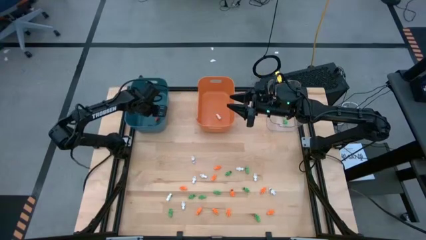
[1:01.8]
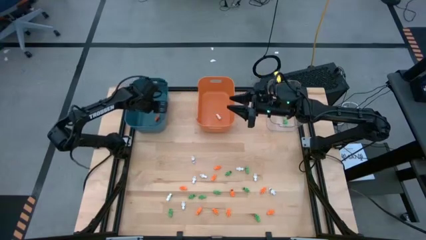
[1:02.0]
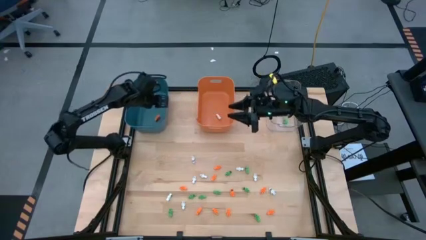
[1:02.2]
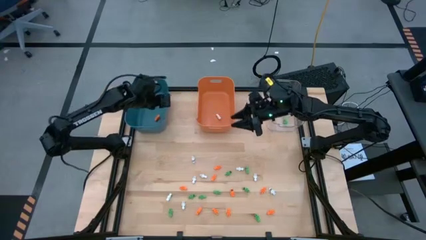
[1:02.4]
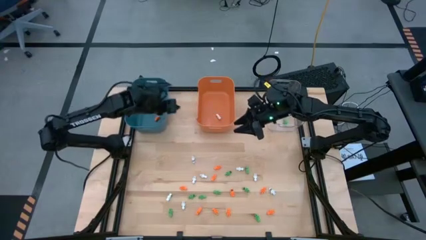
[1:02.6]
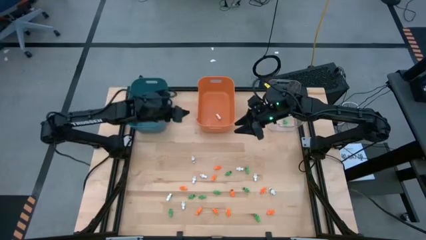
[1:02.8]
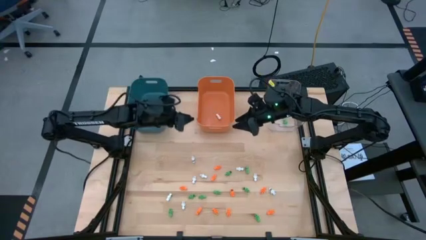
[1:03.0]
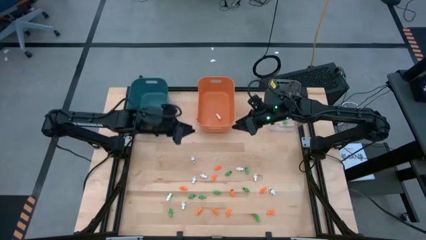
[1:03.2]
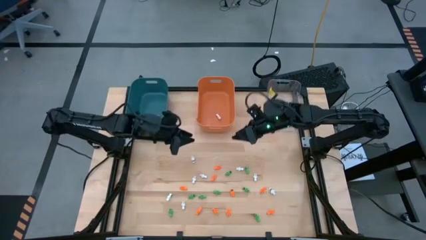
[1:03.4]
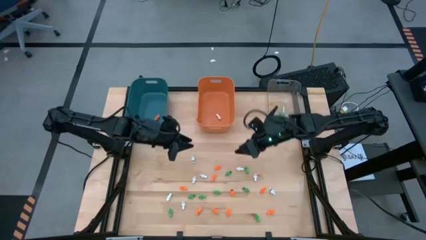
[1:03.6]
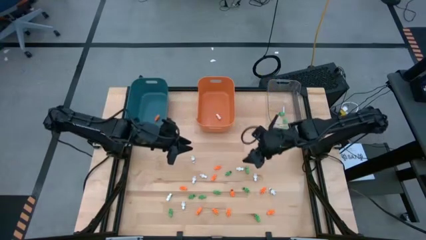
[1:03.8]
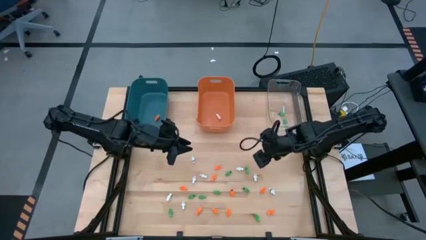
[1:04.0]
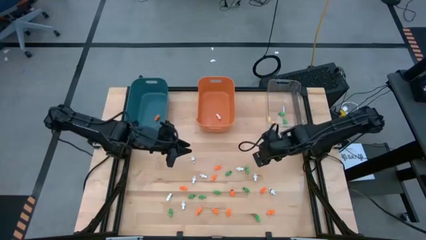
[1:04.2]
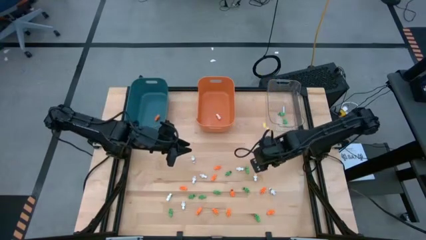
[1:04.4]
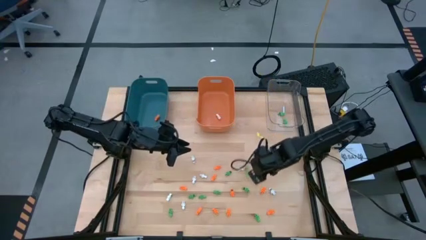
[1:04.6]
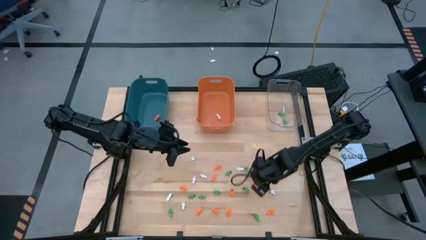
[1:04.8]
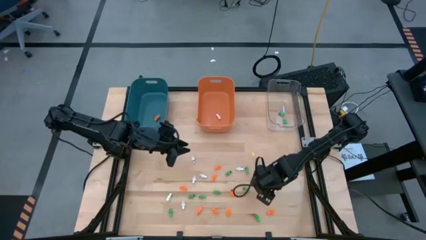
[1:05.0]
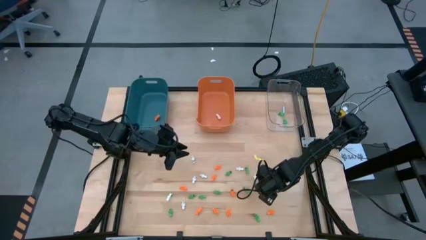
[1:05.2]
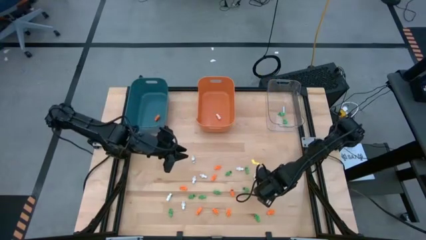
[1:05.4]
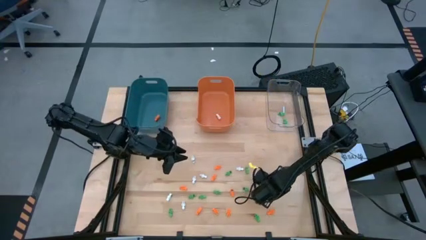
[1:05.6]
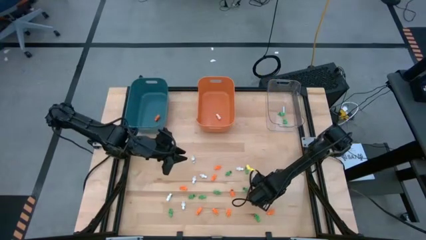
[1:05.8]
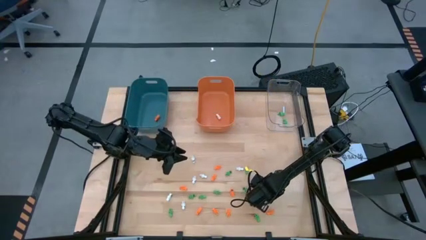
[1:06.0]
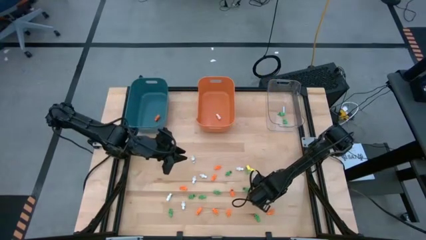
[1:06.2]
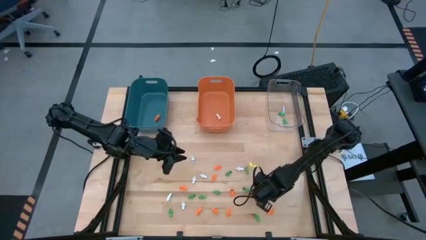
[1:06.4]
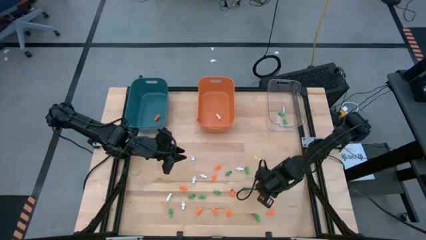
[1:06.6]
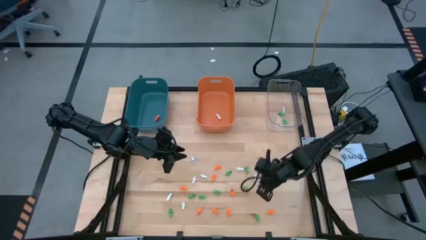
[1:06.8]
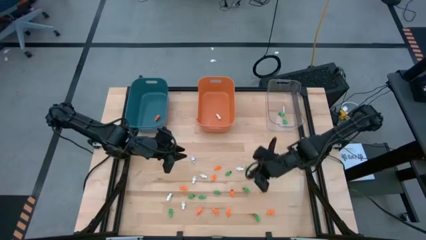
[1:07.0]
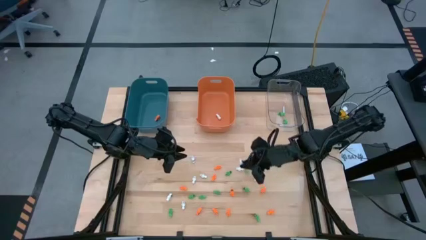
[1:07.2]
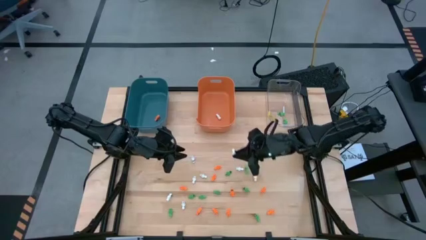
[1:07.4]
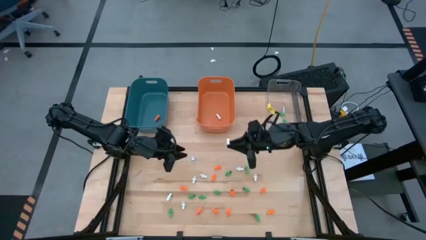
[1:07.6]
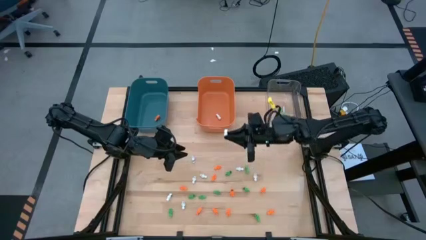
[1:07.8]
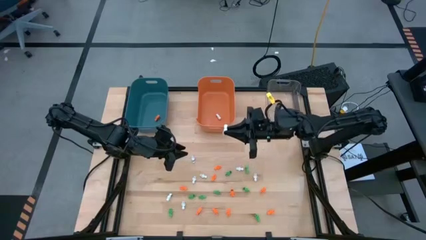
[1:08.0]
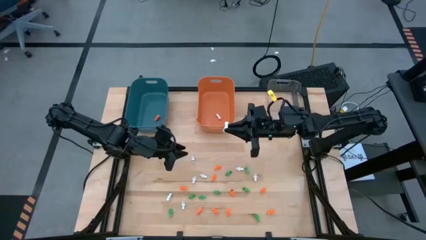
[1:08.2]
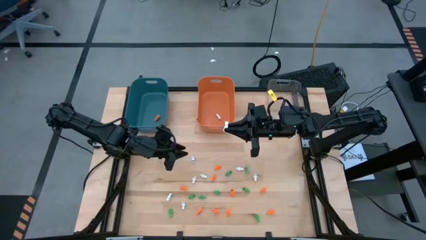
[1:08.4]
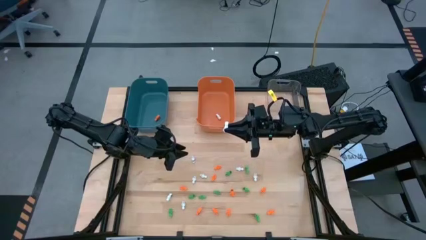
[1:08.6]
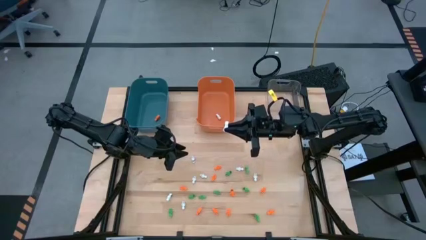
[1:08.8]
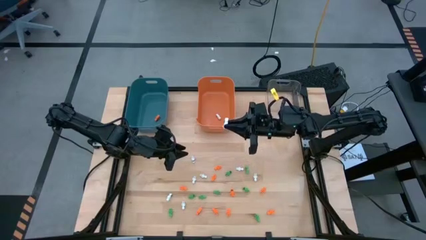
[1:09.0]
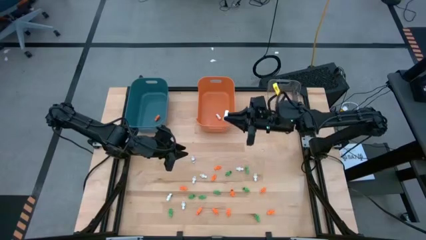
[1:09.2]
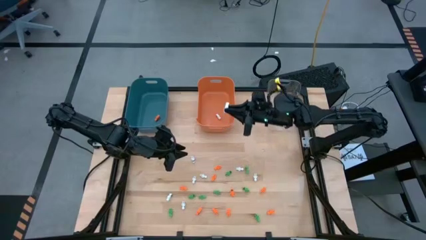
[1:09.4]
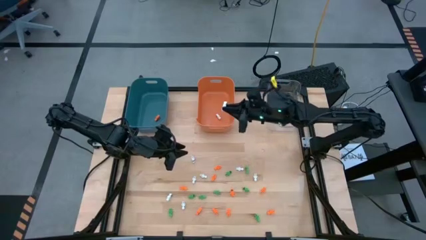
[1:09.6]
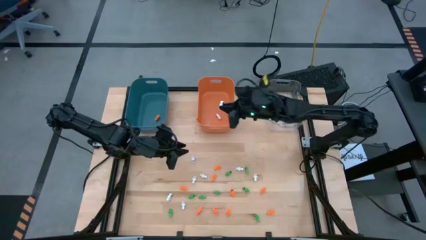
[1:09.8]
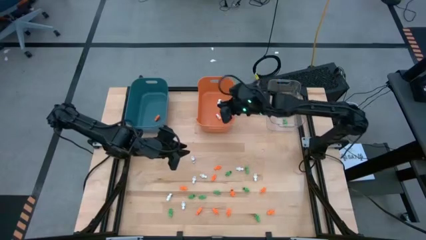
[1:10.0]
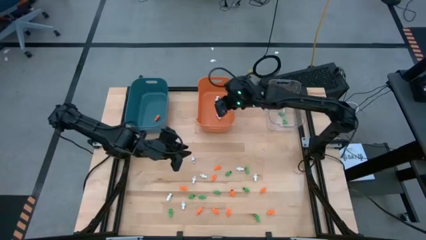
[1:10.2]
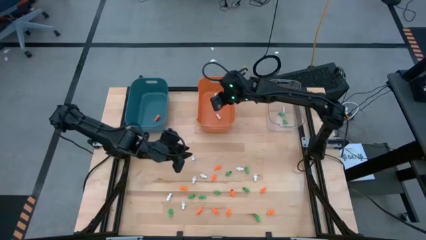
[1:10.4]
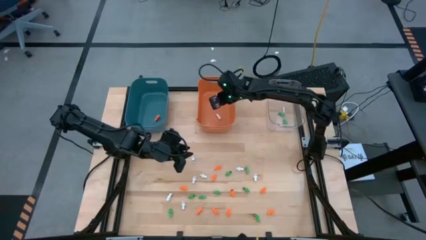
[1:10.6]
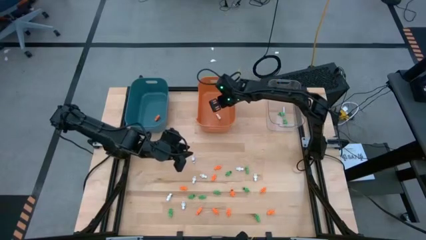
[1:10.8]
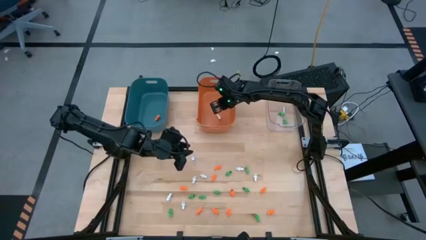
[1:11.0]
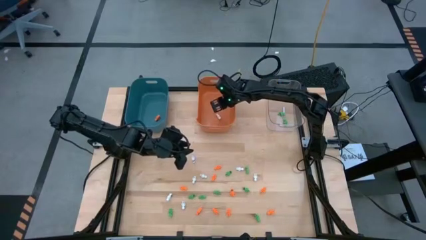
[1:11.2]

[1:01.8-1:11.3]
Task: Sort Halloween decoration
Put the white skeleton toy into the orange bin

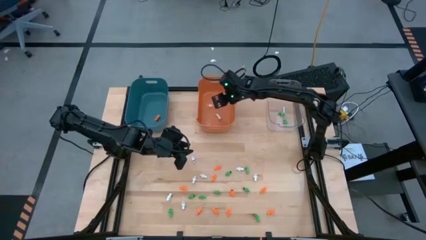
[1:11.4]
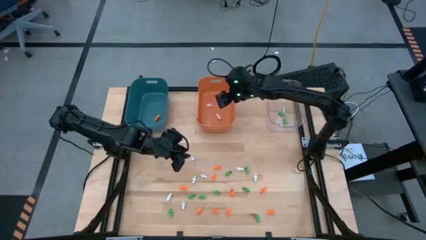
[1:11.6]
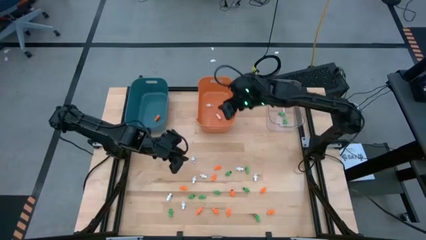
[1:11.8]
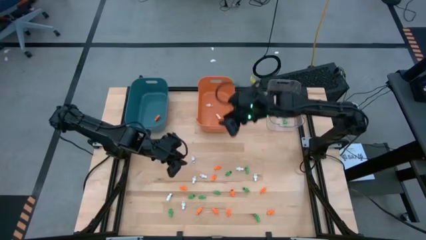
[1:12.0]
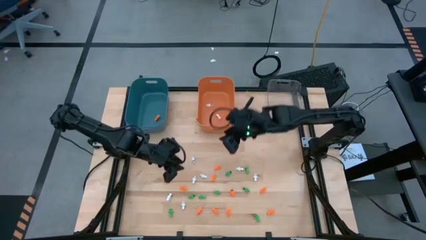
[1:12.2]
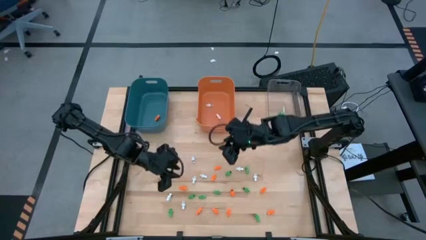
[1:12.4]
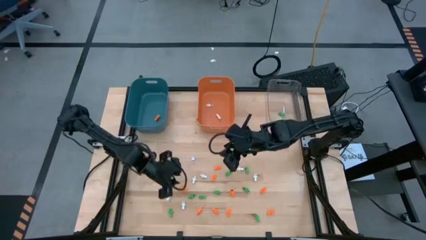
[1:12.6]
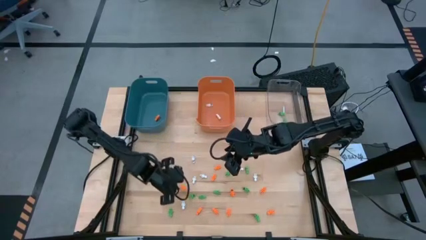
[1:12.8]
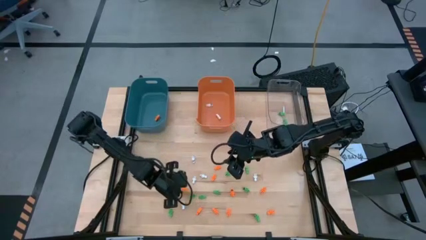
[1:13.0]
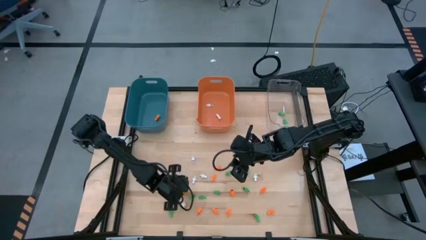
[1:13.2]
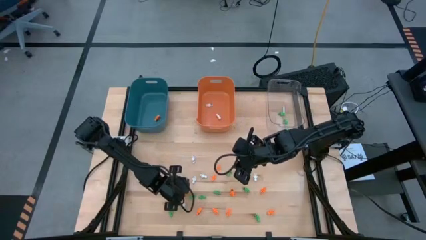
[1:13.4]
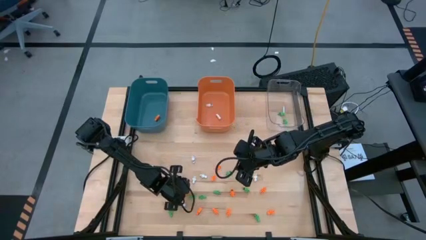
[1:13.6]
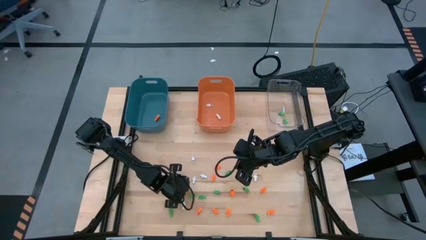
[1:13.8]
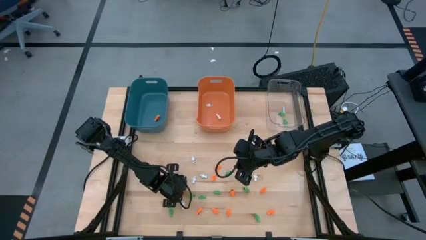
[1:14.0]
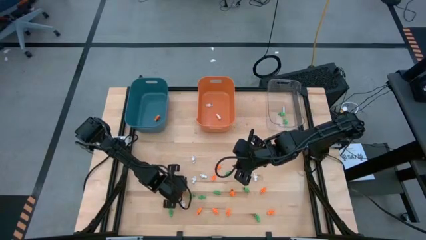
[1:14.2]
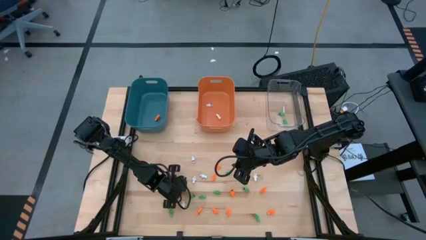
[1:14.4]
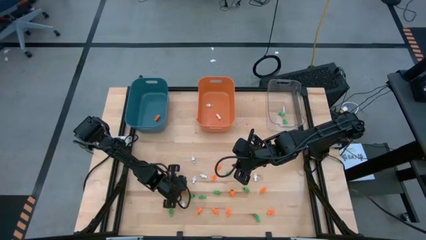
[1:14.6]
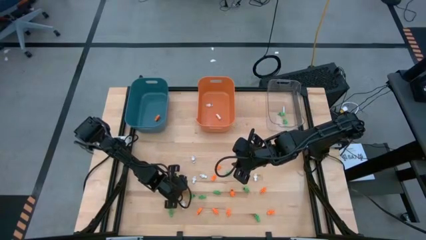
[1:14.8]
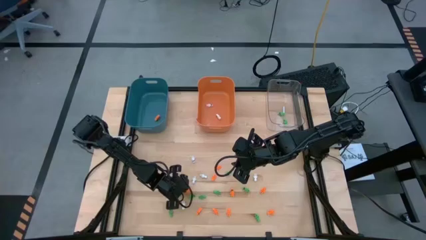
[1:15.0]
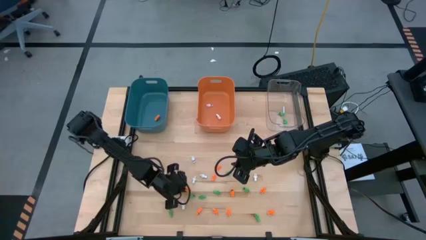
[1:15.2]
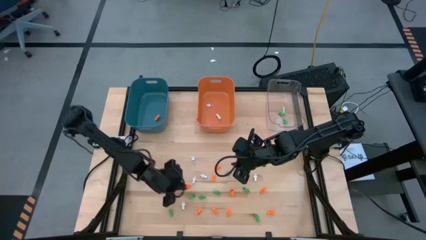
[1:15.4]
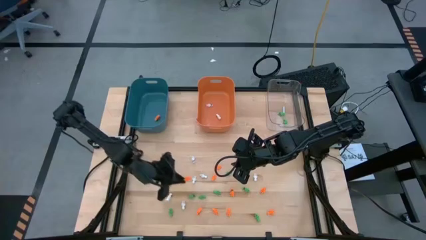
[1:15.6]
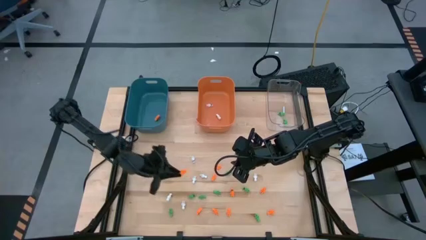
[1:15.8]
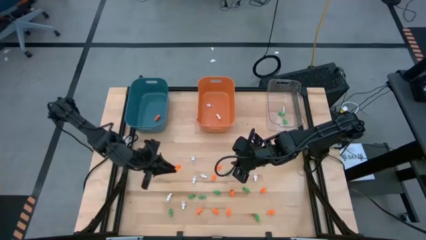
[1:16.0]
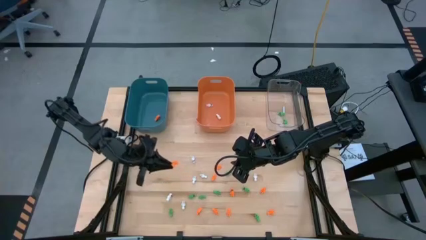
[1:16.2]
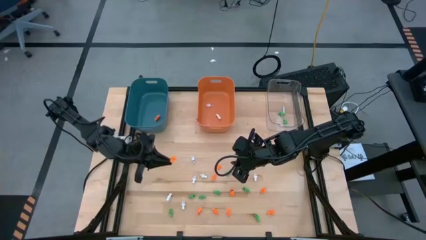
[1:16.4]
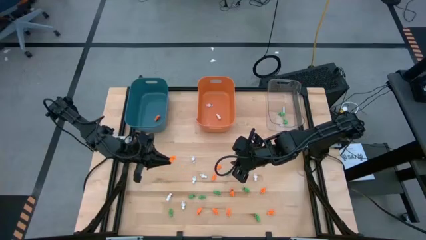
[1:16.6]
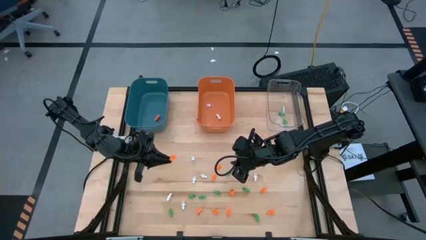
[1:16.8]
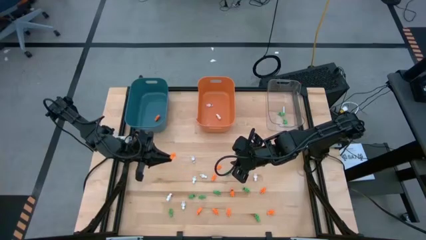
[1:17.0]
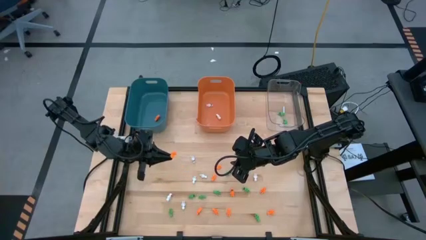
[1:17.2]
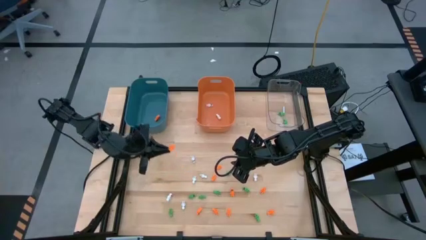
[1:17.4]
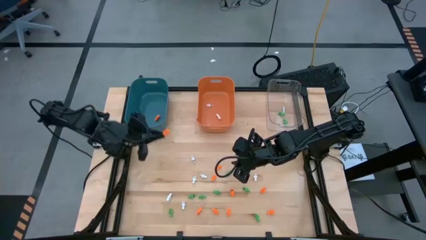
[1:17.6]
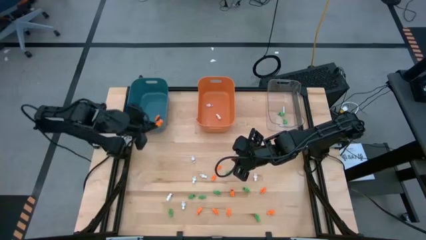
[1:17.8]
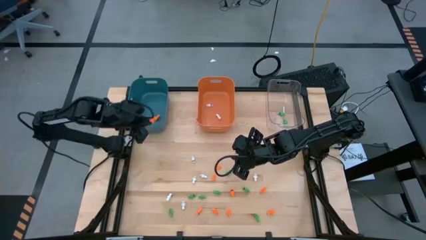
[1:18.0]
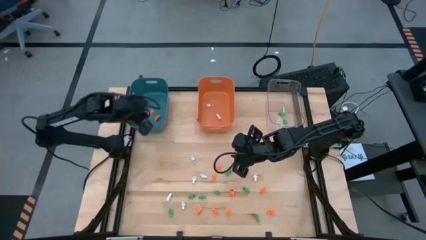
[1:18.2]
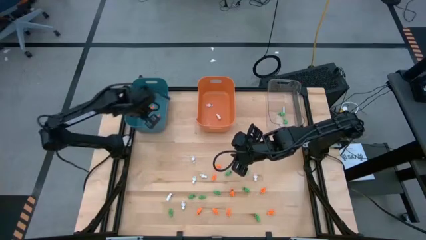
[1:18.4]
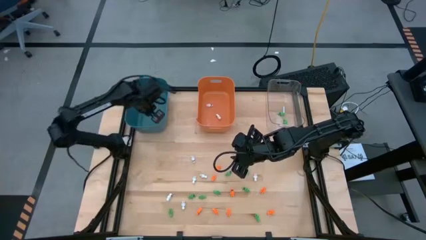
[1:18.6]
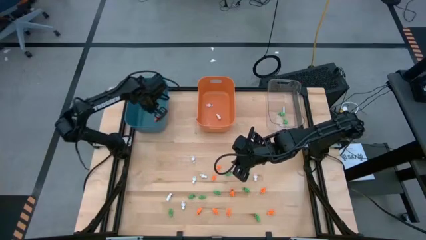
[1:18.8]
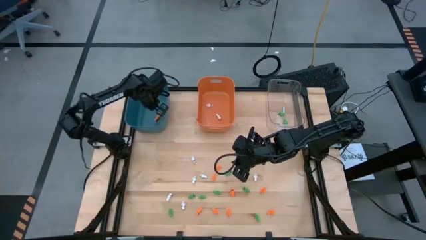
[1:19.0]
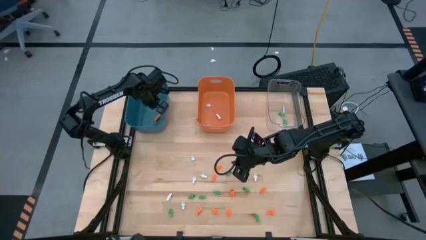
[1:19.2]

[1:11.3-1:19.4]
Put the orange skeleton toy into the blue bin
